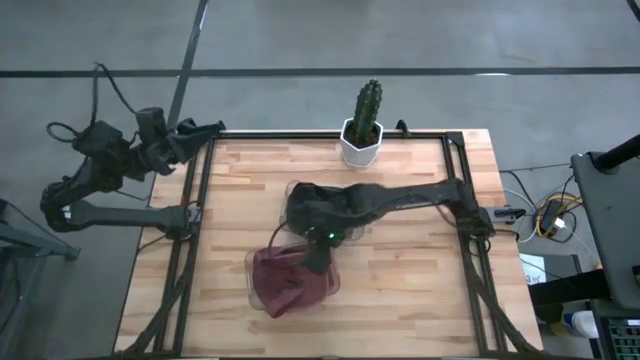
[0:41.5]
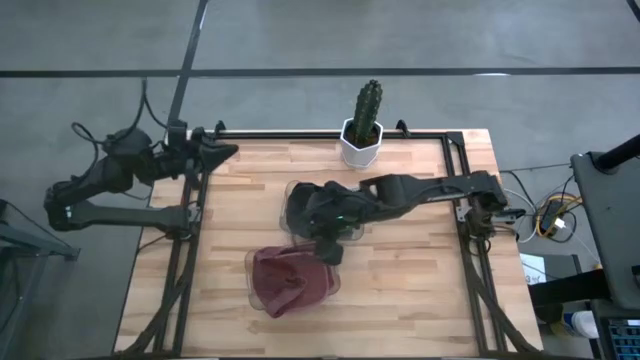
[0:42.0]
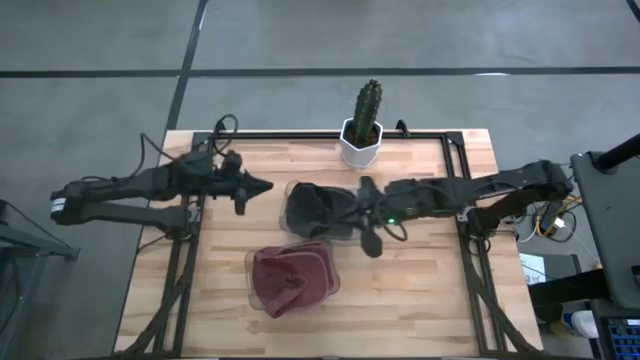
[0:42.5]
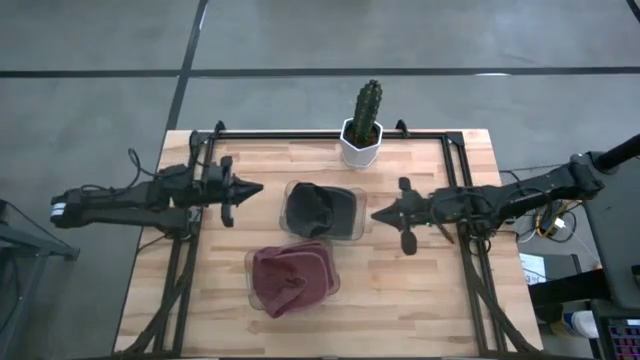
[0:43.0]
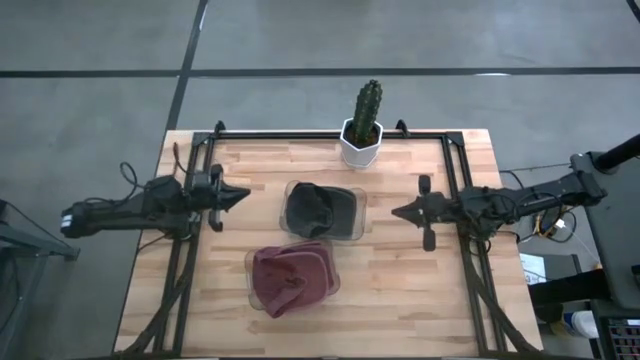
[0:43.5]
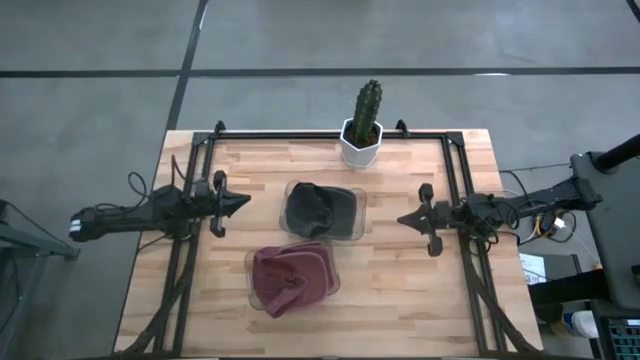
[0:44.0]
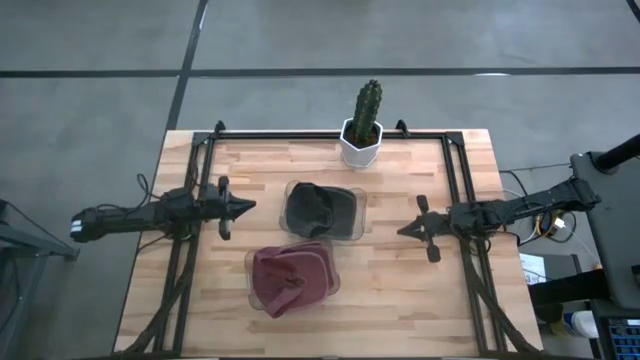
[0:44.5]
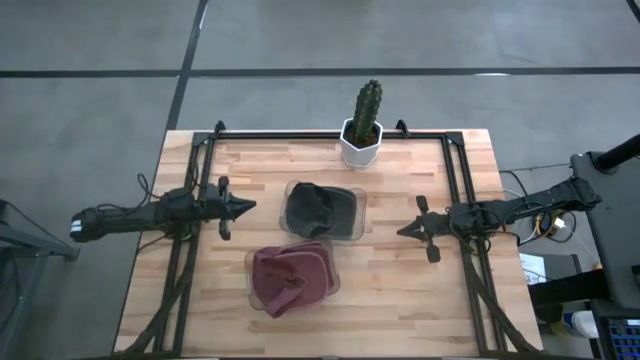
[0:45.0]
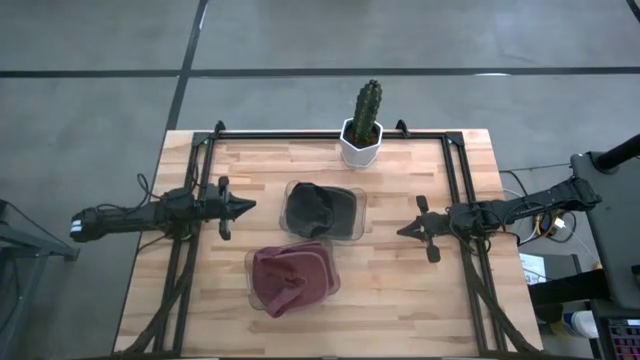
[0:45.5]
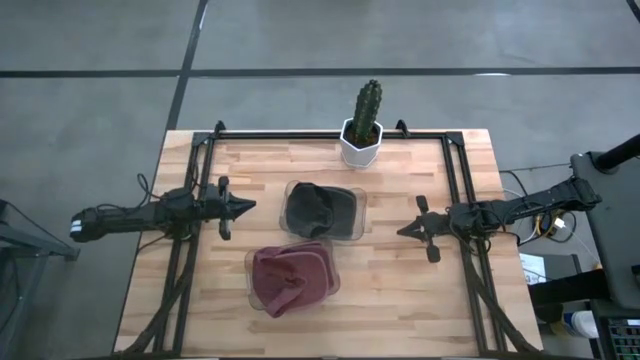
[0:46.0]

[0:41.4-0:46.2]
Task: Pick & Place hat
Return to Home Position

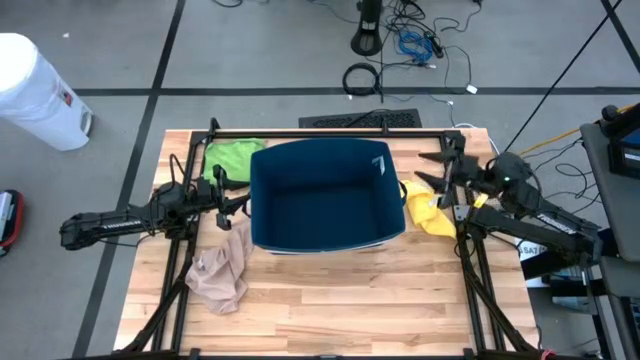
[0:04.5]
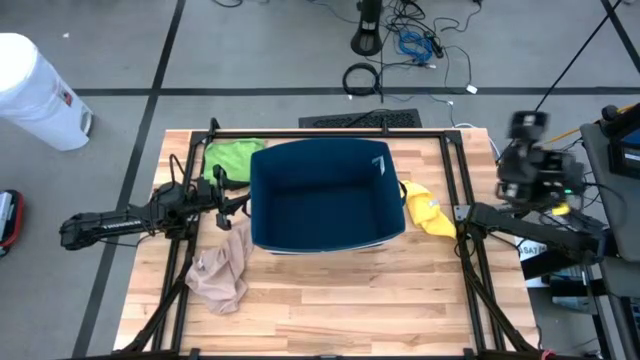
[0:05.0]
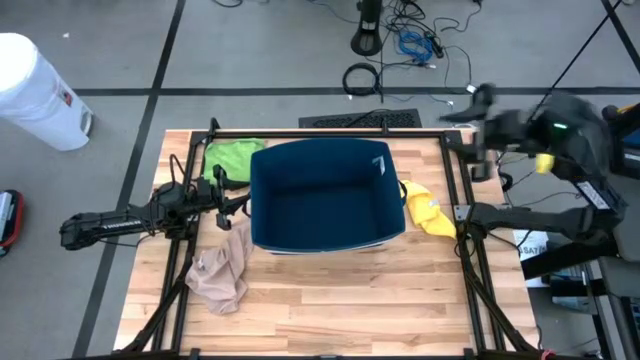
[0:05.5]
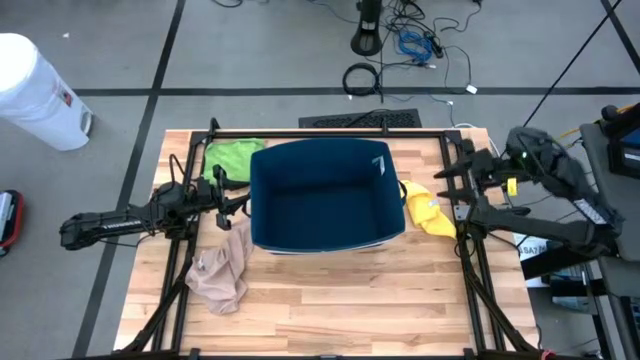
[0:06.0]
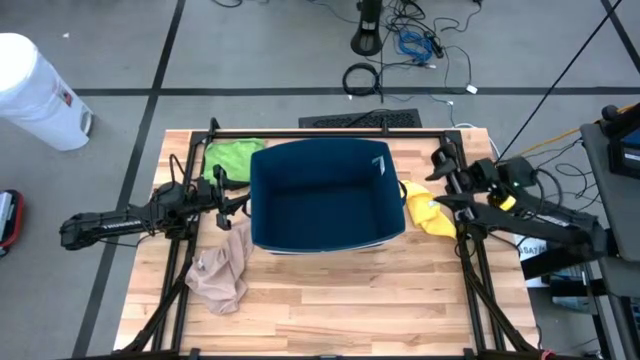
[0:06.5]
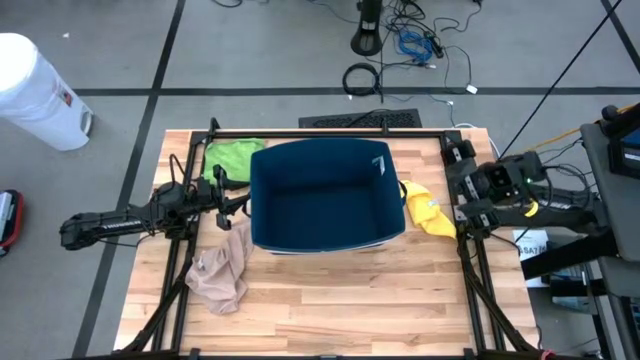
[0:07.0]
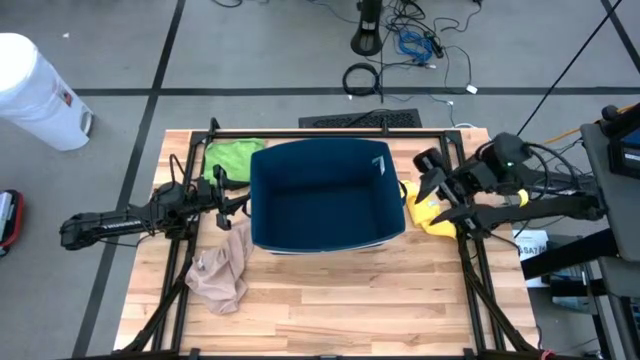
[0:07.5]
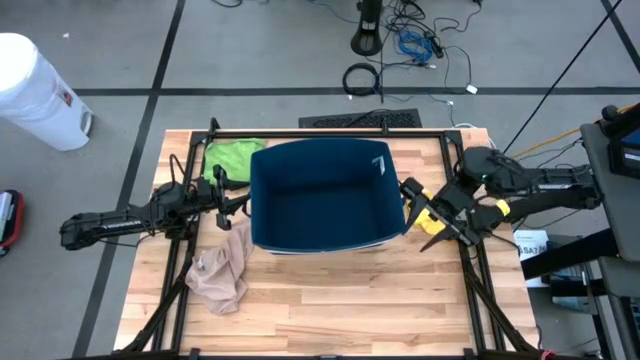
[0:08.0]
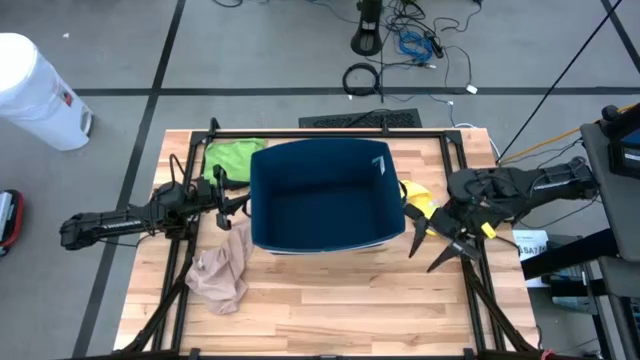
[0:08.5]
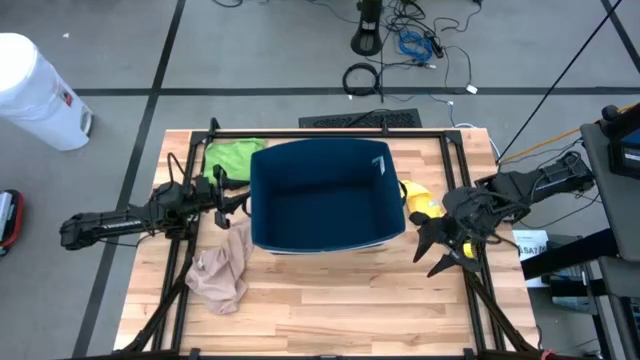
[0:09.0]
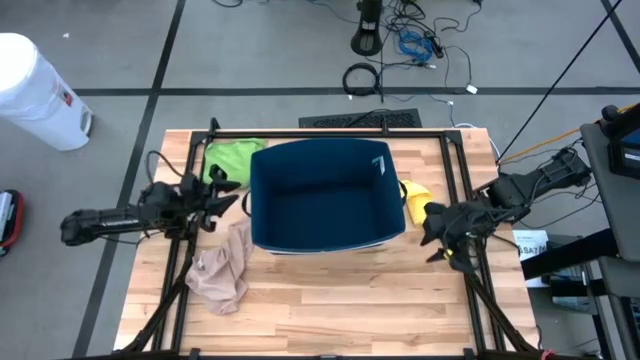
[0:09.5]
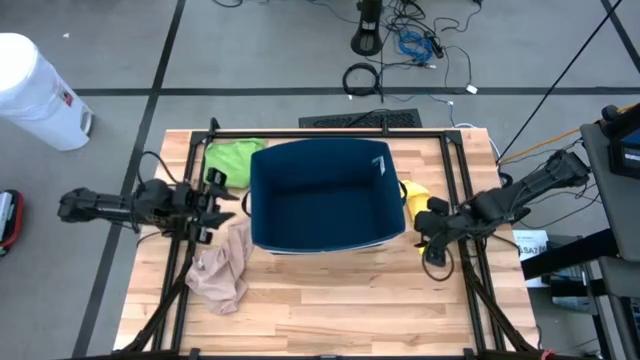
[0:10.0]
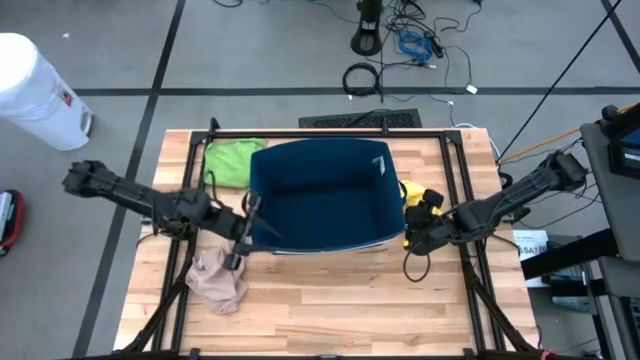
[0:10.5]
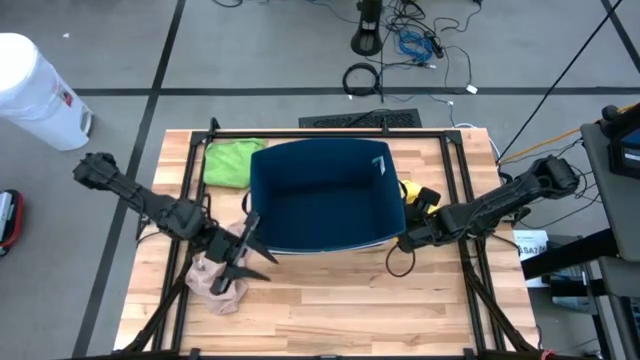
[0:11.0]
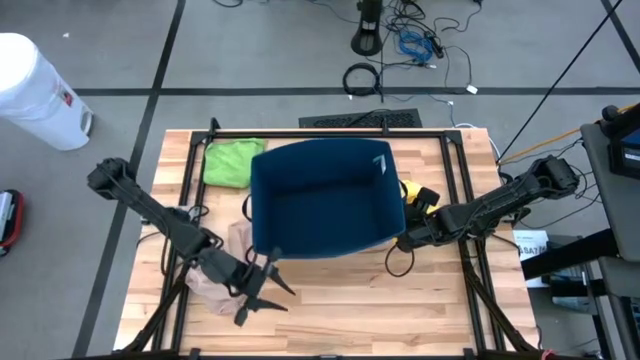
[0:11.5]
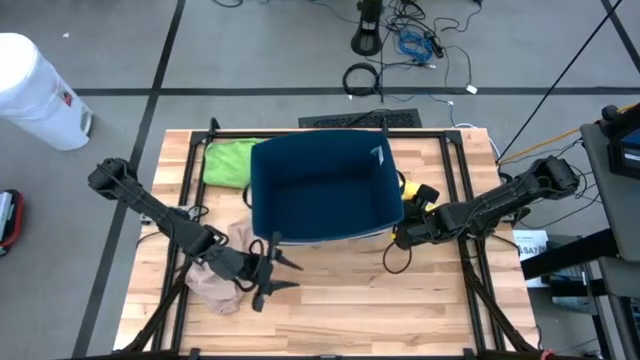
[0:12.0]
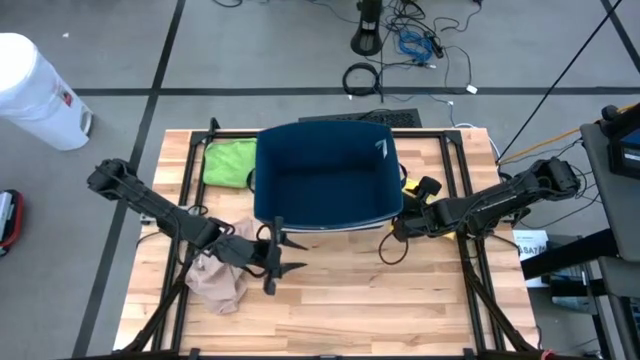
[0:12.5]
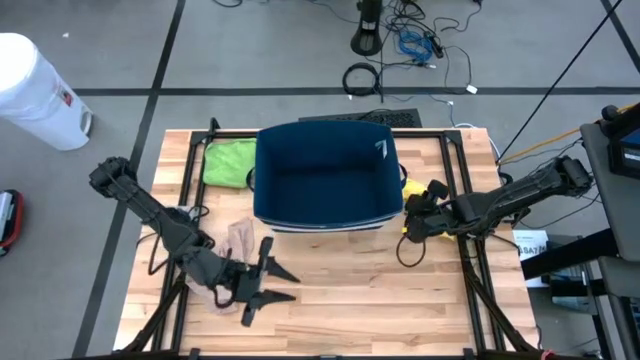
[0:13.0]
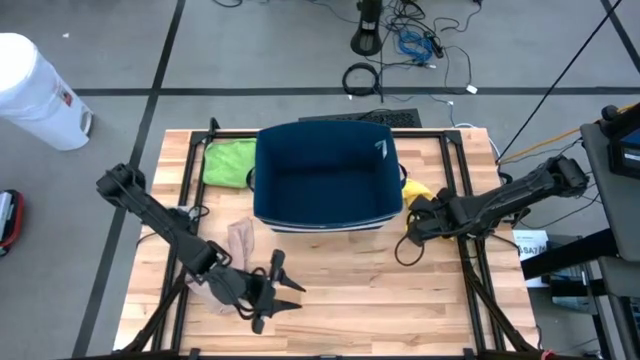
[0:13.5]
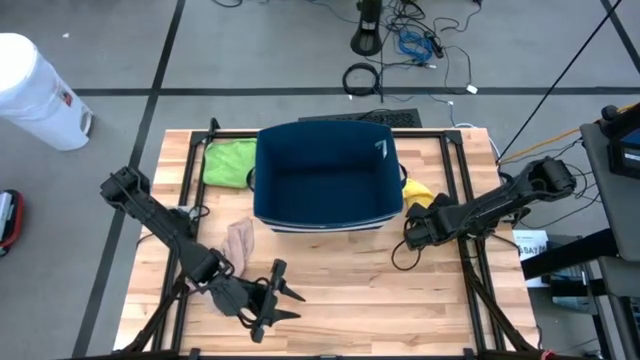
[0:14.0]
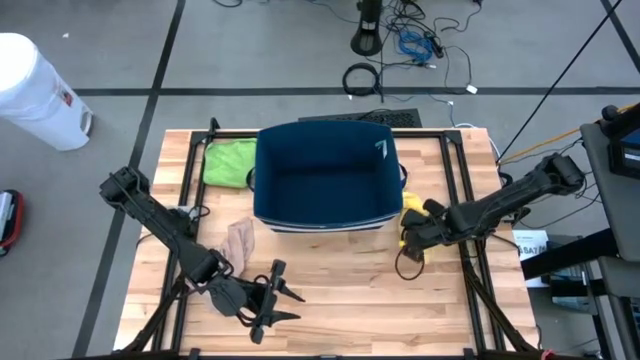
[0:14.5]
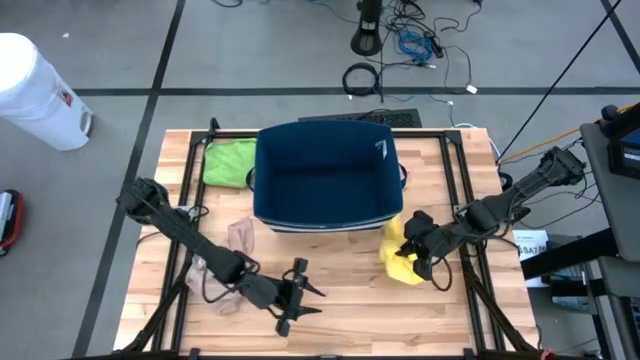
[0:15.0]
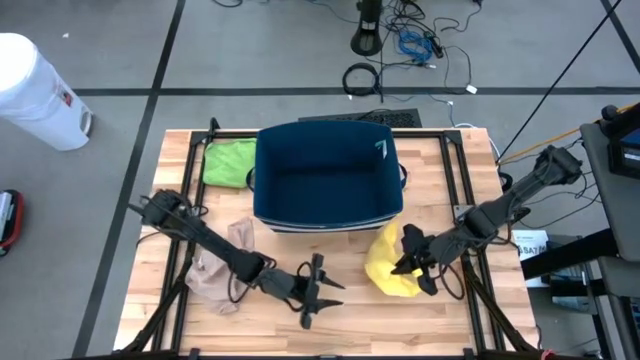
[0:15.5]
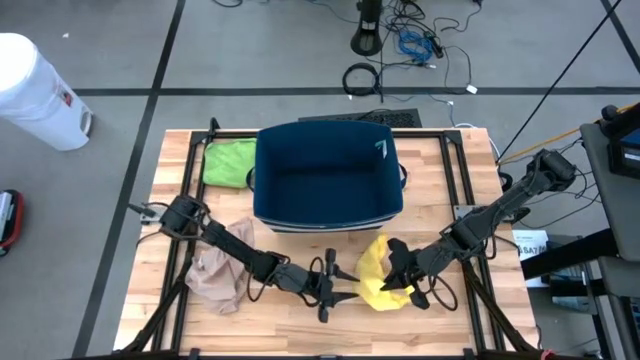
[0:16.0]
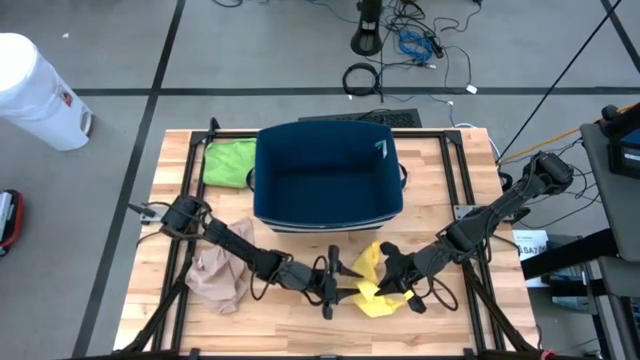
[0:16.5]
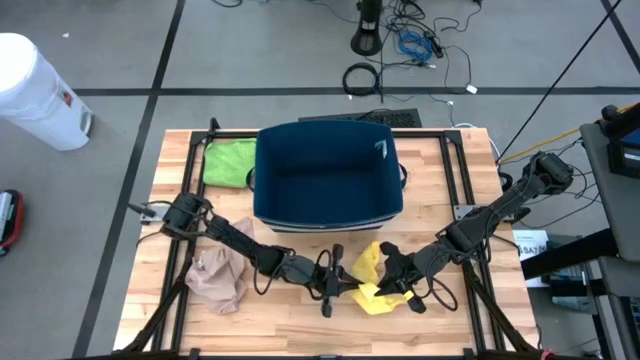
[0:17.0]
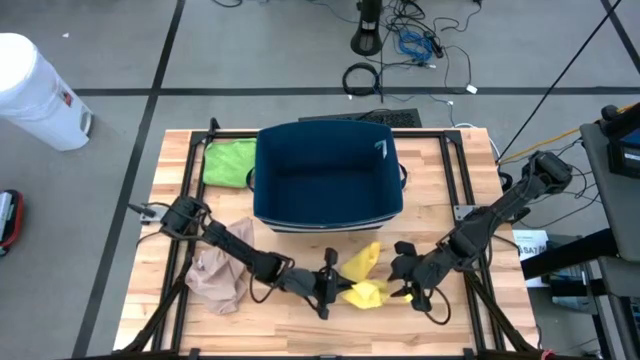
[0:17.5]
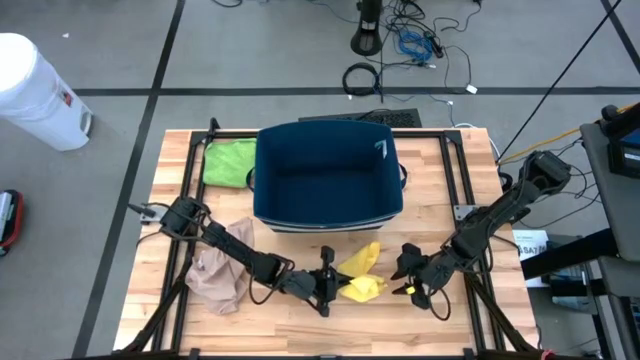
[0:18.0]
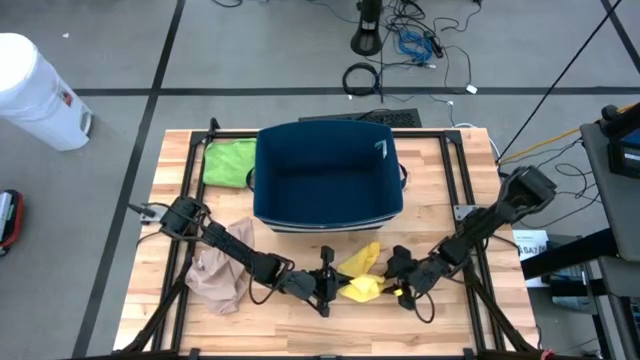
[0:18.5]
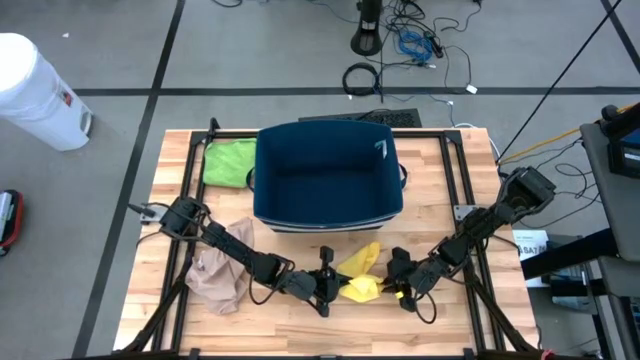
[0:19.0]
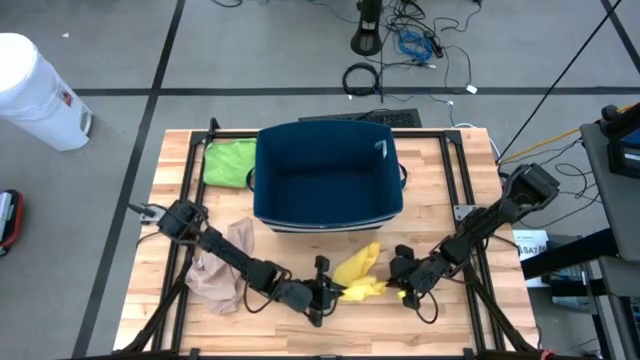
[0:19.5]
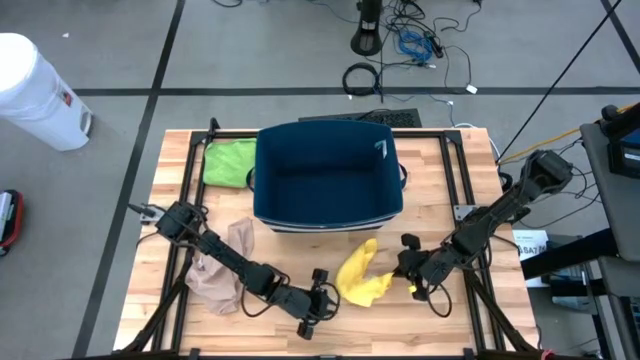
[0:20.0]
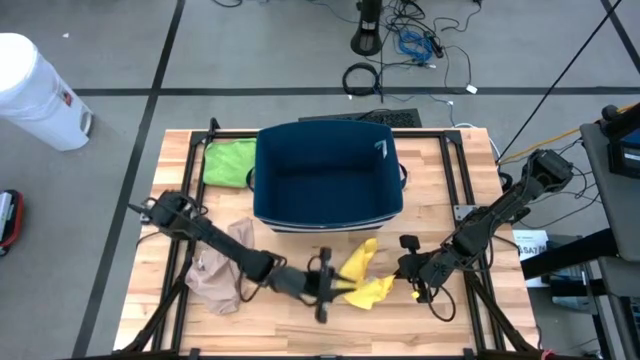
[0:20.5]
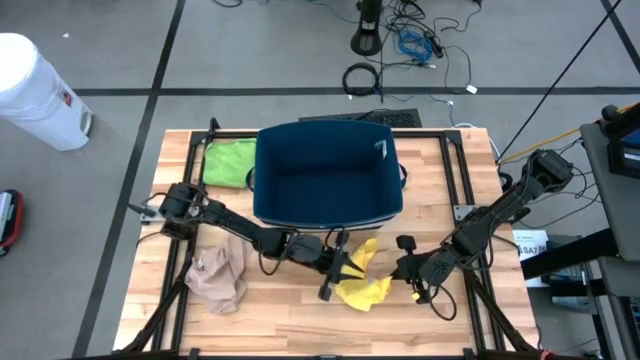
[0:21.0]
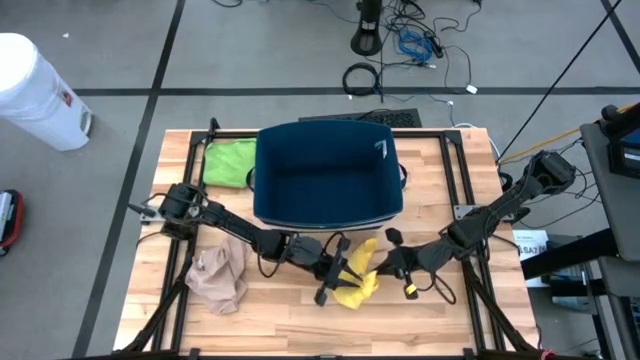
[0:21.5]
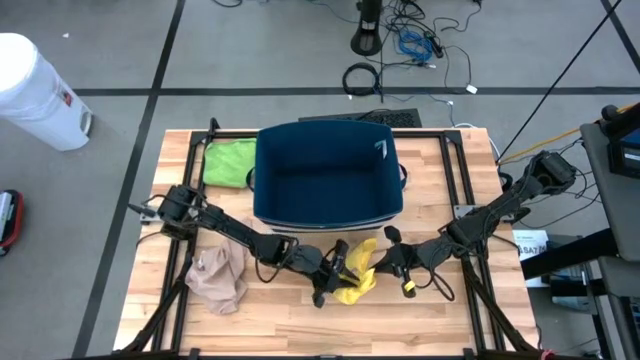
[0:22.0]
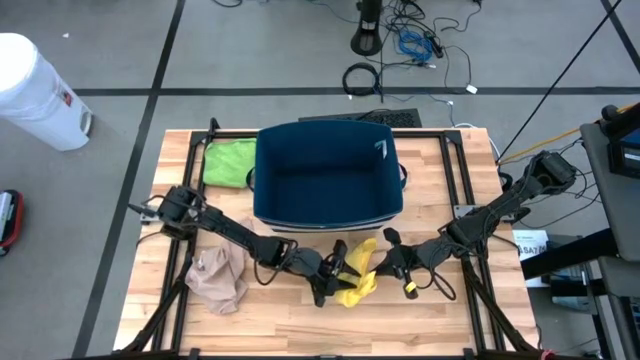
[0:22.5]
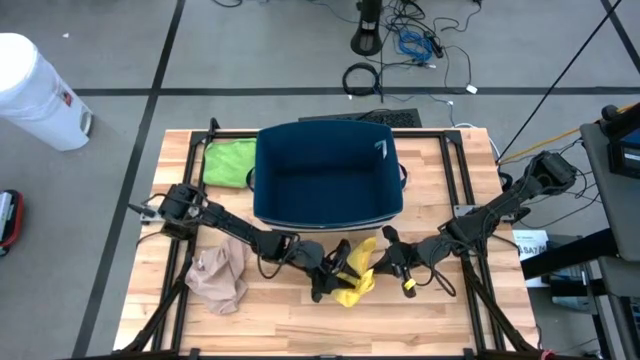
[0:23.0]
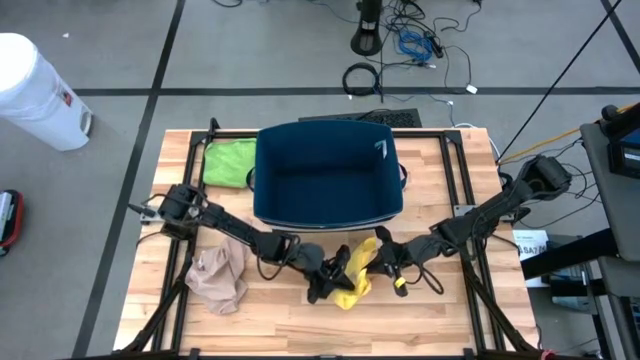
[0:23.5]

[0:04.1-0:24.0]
Task: Fold towel
Fold the yellow towel
